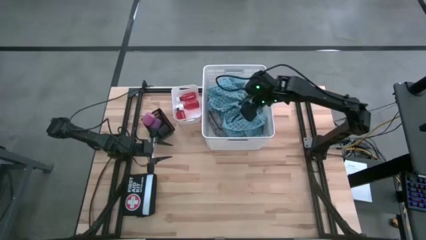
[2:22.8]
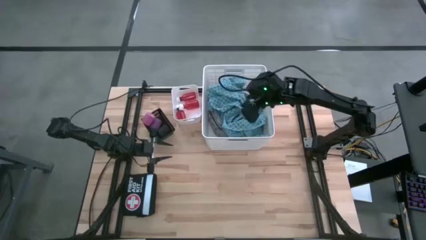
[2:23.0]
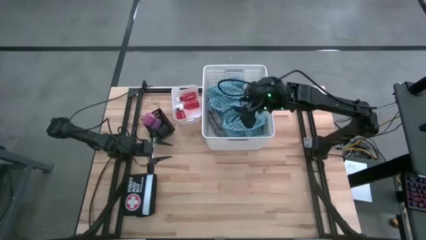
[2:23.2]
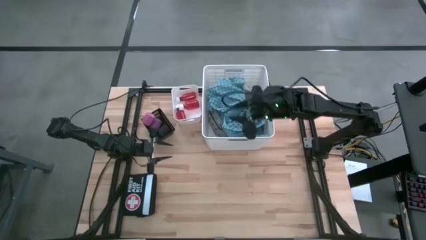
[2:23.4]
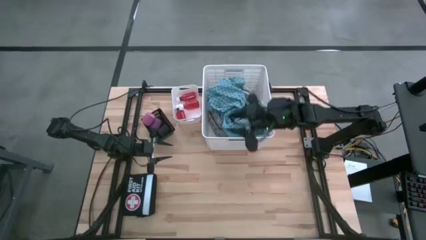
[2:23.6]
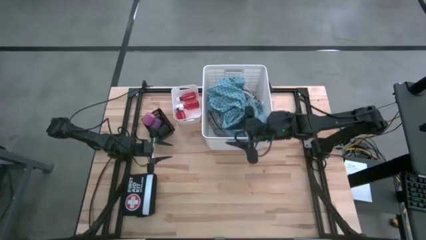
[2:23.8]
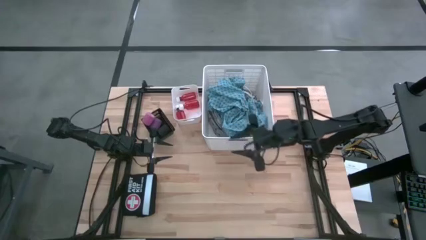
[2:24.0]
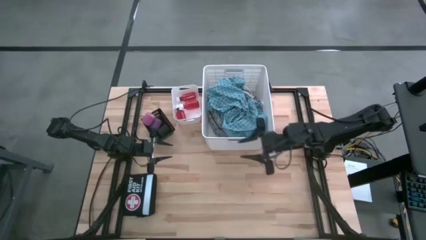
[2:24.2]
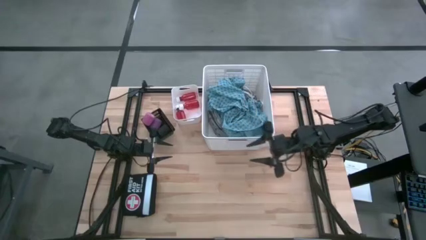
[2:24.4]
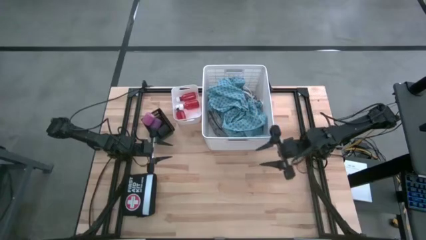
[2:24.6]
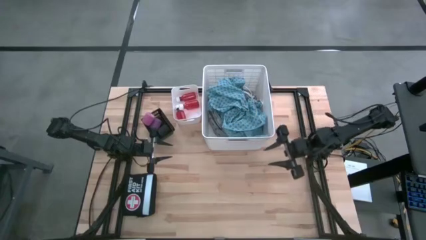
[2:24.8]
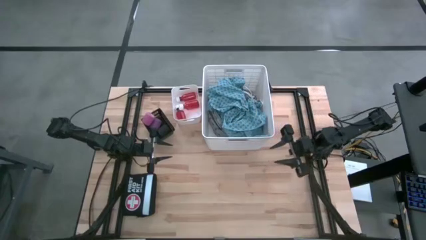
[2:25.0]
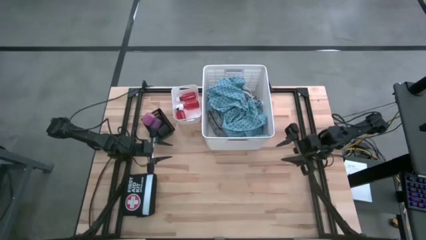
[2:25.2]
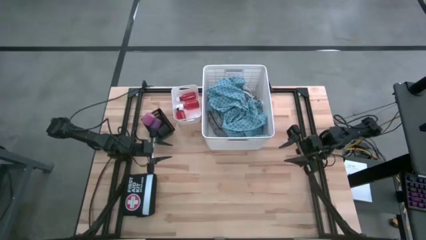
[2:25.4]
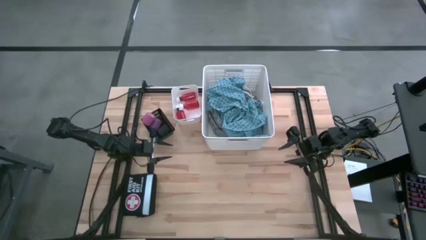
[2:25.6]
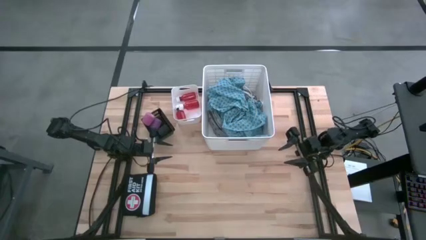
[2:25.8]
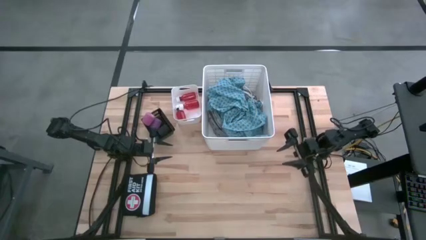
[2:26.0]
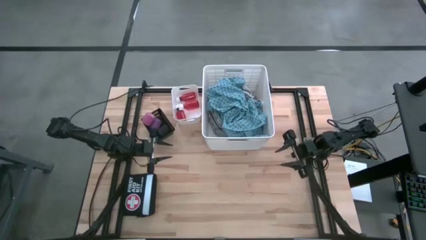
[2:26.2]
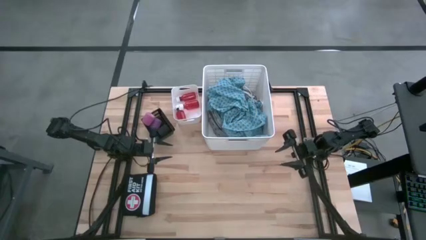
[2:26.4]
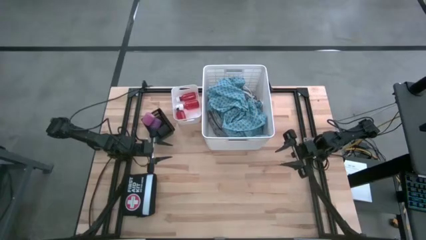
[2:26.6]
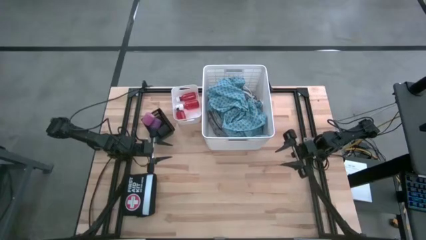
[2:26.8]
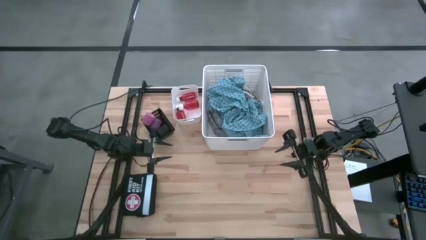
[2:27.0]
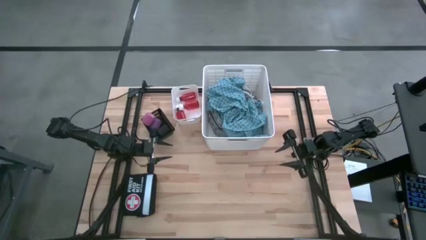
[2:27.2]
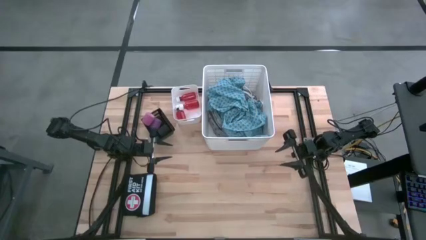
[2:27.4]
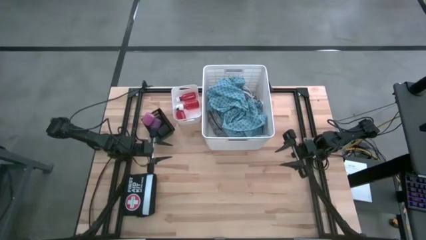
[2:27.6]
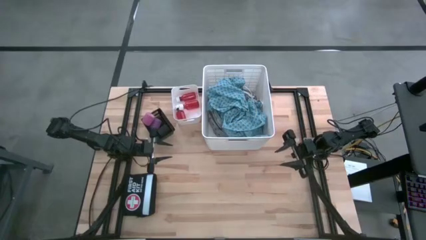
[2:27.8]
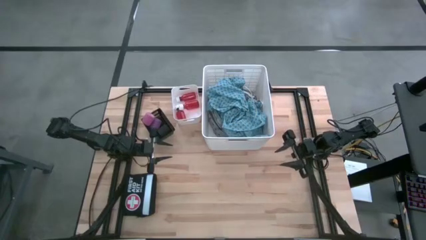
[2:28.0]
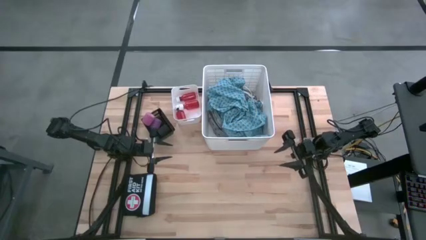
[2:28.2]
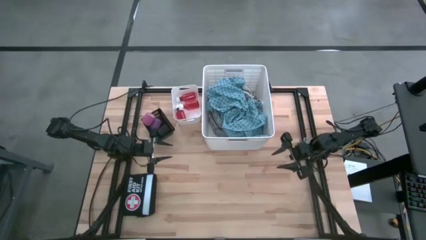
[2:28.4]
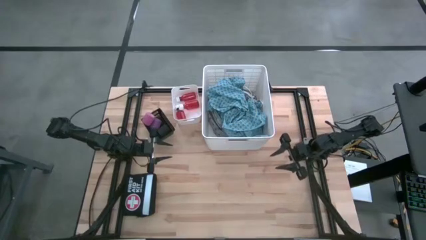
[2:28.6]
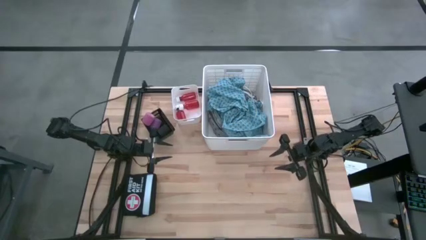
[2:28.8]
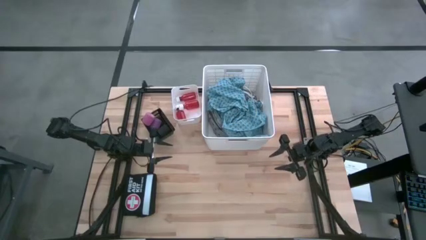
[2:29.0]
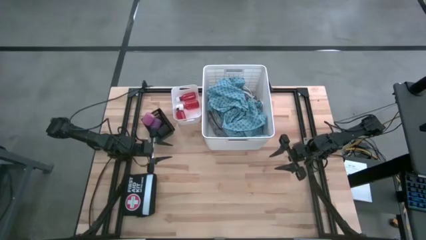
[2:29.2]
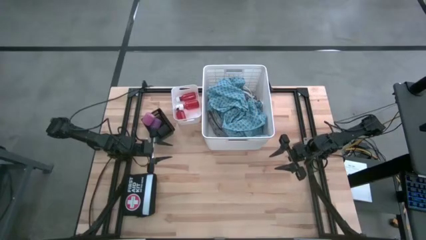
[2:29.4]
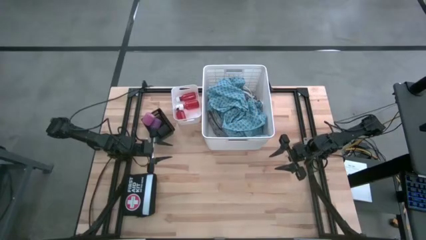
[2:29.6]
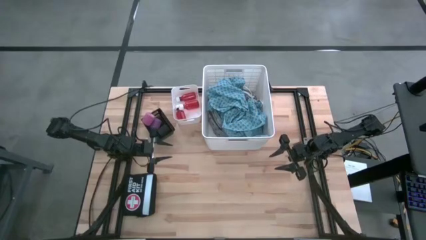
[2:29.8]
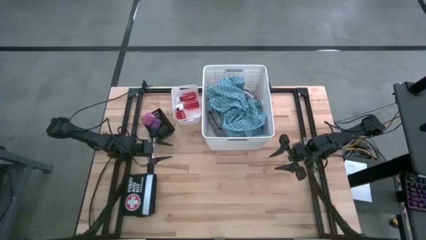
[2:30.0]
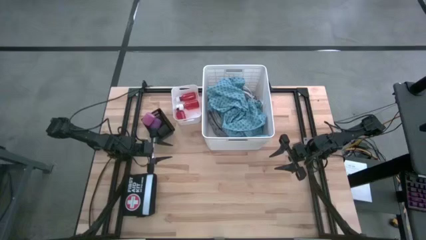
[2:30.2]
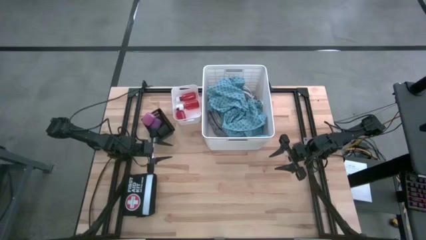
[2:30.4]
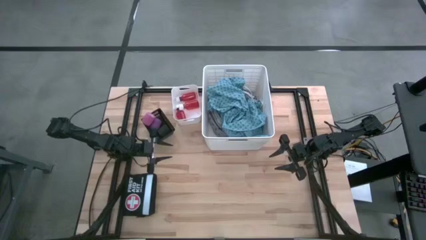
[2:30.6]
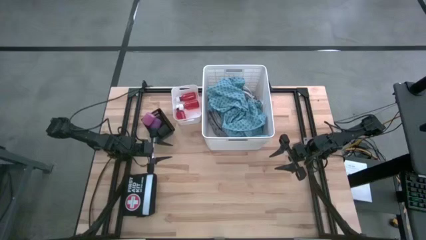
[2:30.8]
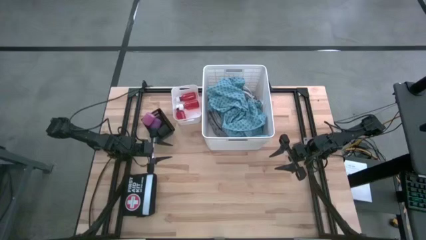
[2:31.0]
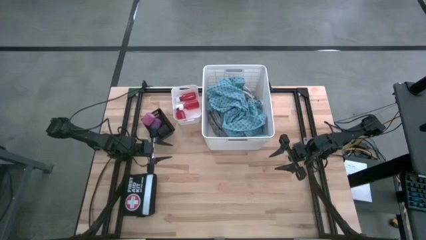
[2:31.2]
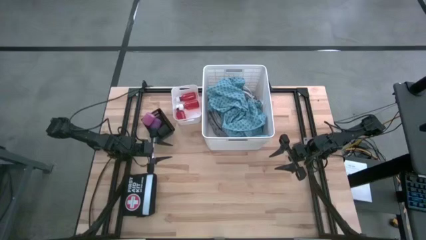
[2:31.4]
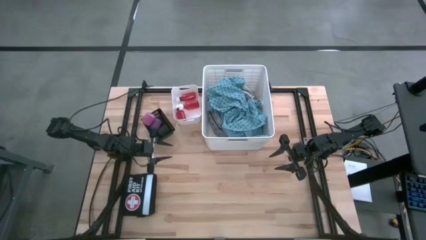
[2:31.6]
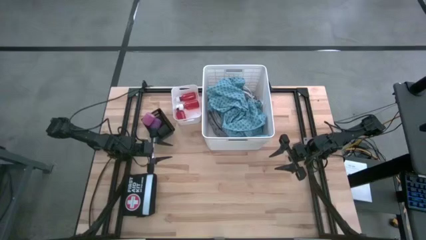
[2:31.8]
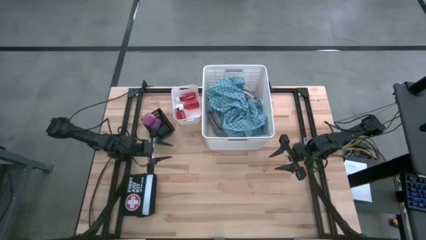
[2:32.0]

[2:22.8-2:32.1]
Task: Pick & Place Medicine items
Return to Home Position

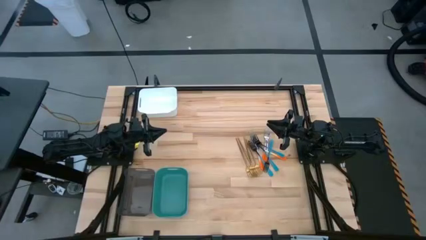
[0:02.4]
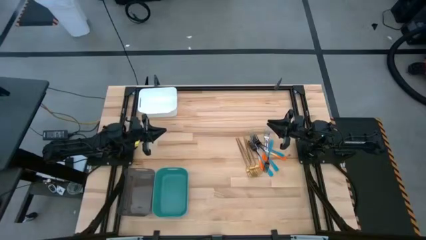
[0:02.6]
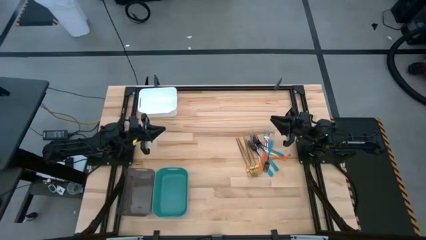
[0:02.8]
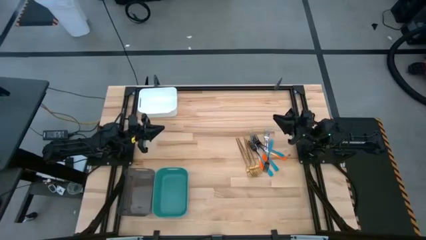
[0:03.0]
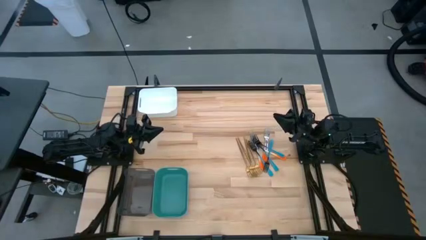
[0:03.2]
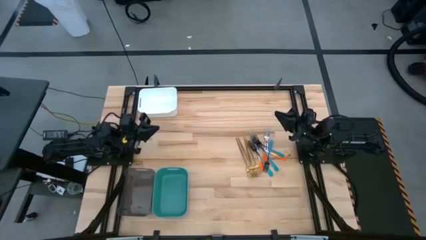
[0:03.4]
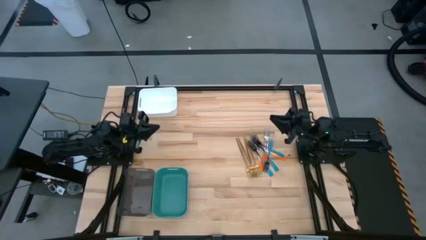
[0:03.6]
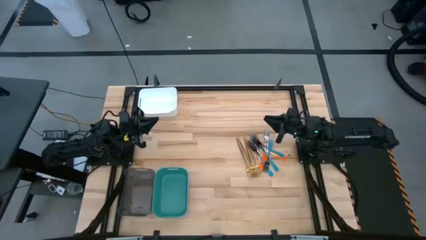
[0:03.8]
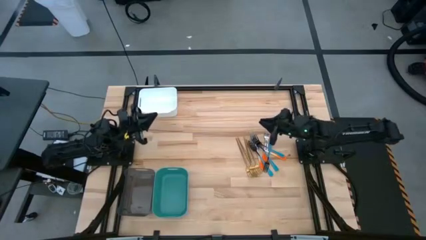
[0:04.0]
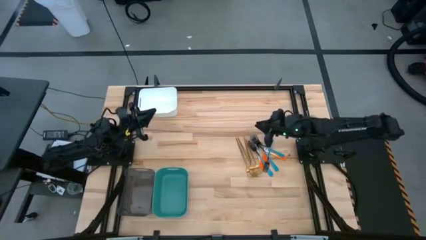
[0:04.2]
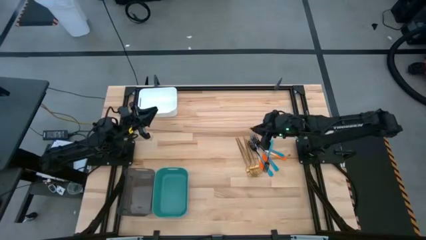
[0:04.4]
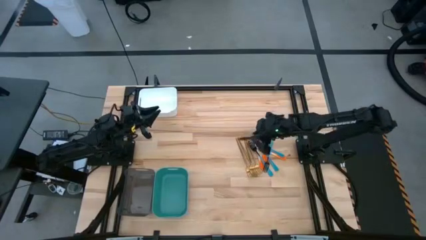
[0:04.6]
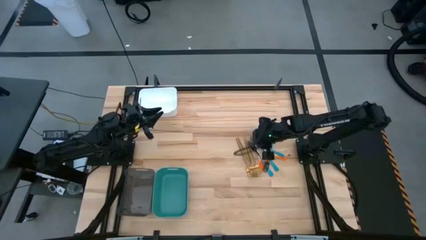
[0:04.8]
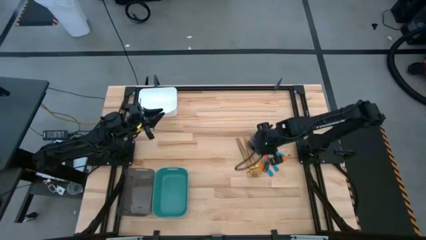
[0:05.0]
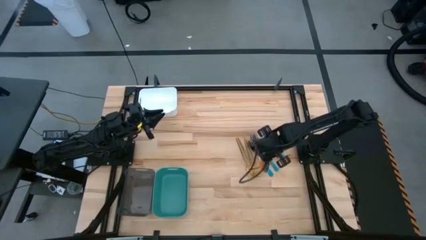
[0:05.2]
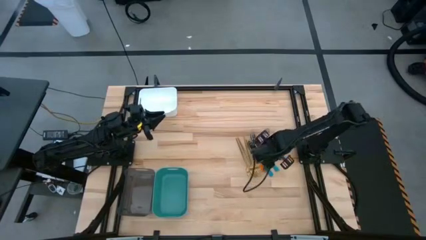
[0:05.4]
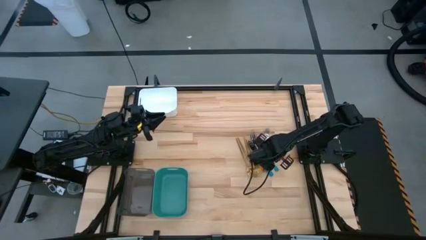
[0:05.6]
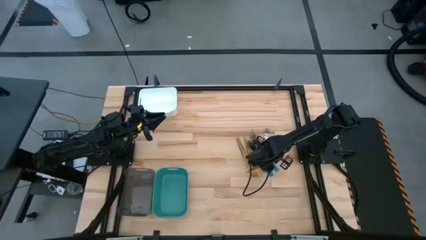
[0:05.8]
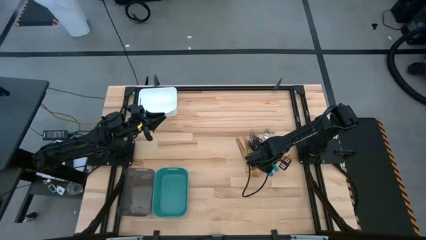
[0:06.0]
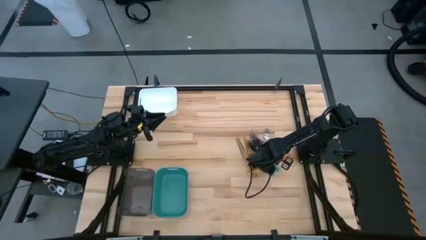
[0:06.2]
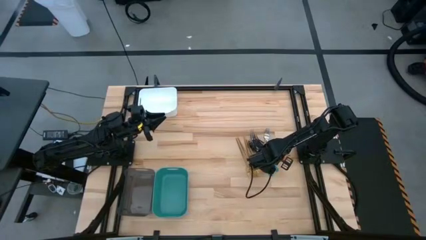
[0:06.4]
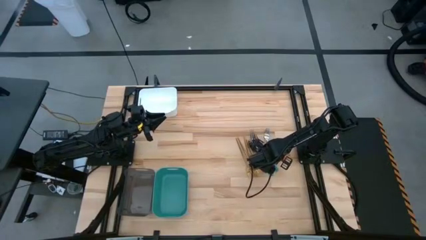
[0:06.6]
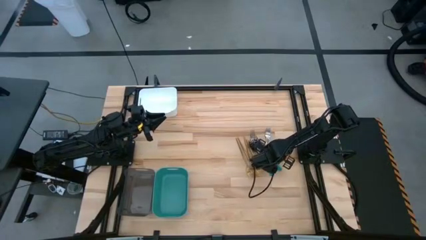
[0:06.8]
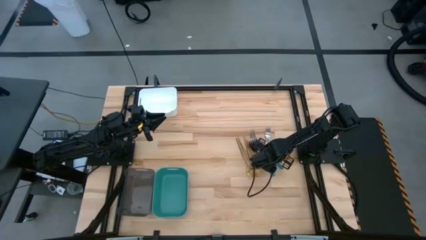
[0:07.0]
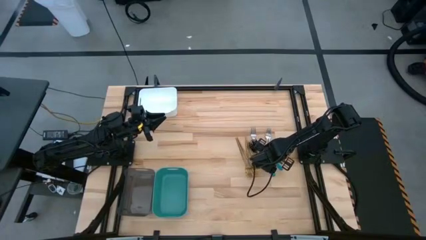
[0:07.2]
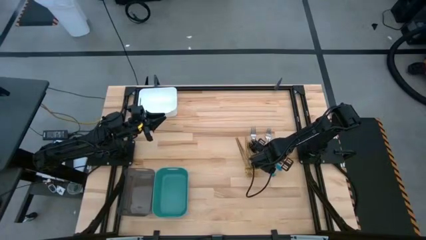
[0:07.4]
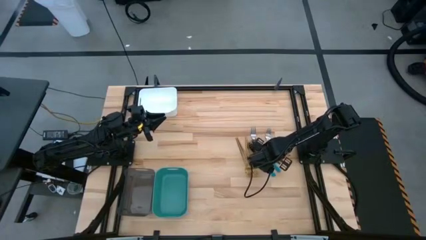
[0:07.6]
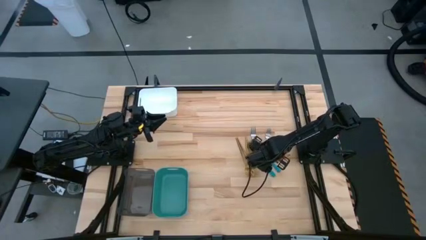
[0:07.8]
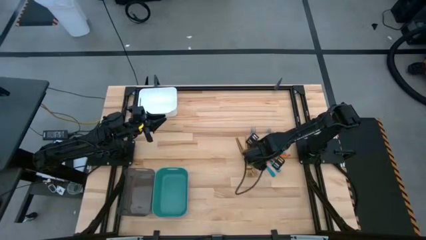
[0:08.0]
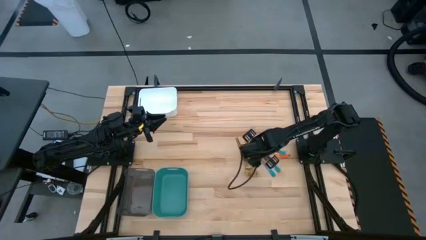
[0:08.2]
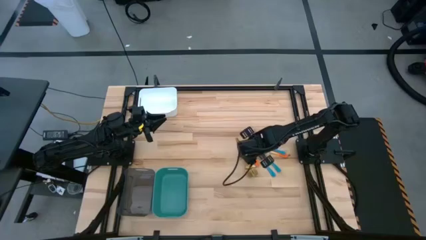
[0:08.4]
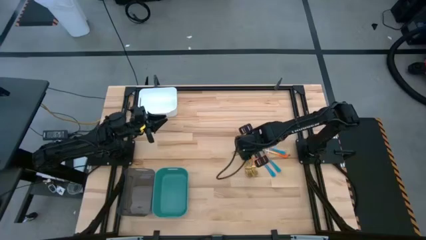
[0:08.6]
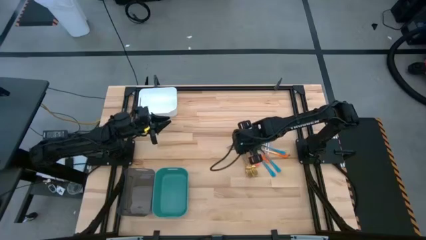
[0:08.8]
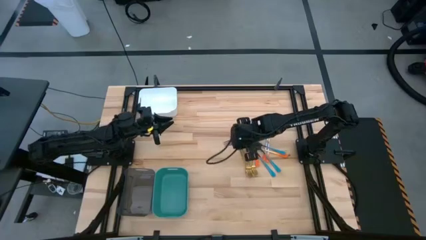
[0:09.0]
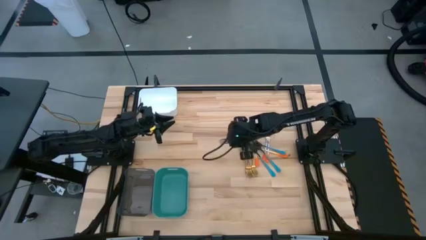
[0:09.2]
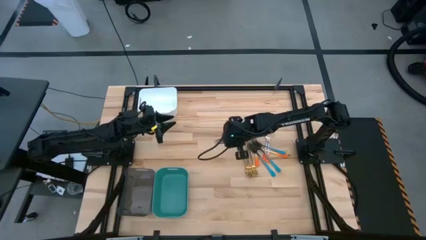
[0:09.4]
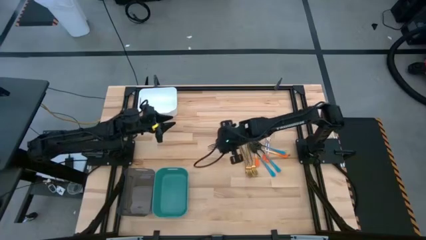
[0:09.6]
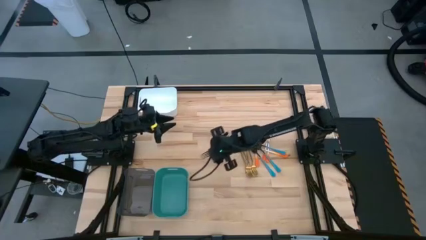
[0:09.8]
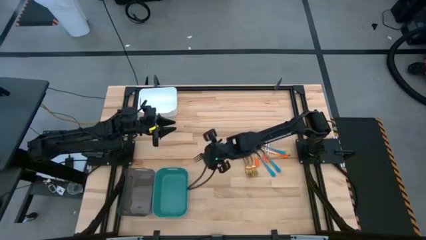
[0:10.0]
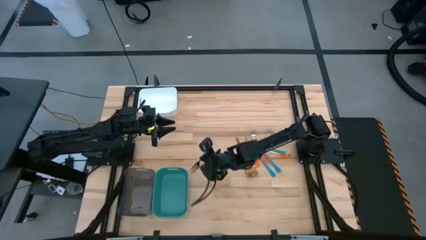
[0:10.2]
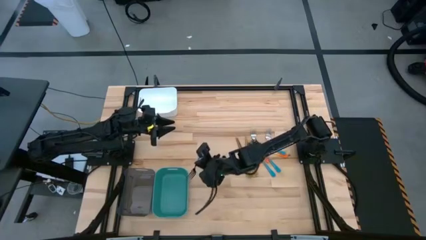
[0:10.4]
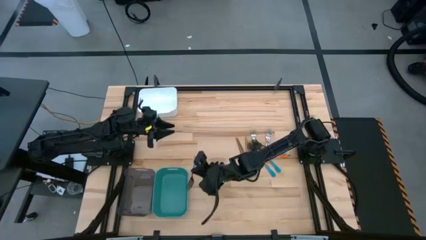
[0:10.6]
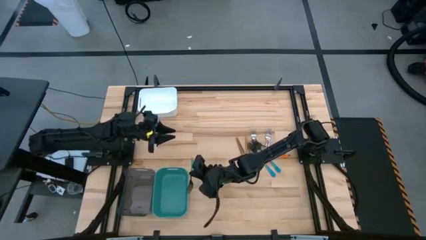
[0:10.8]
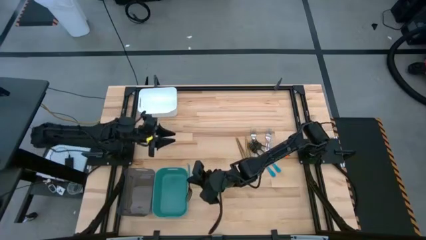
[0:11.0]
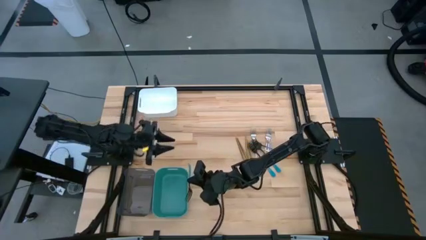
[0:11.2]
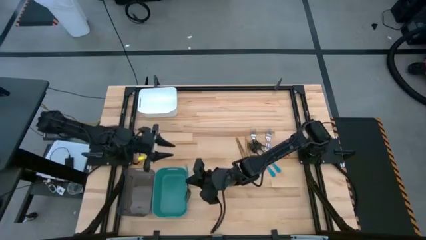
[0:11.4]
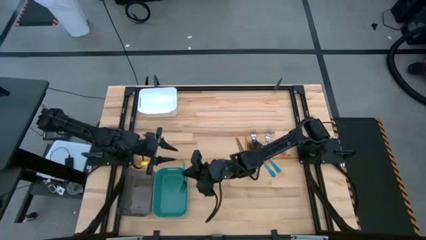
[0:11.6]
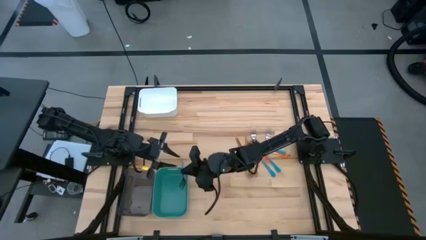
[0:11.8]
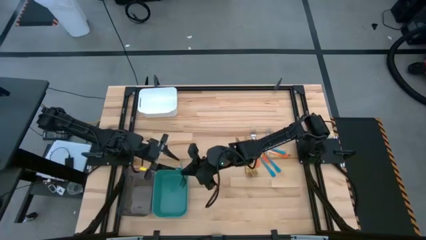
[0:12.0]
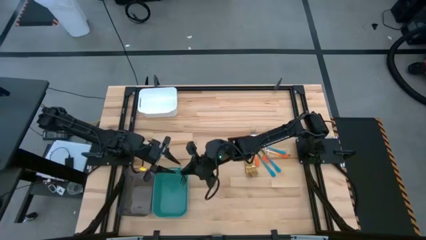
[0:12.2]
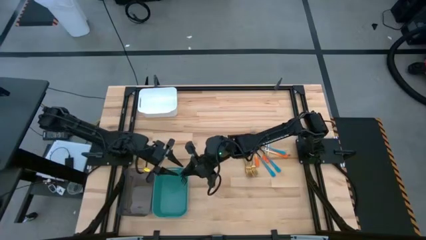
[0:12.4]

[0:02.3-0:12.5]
Task: Sort silverware by color (type)
Put the blue fork into the green bin
